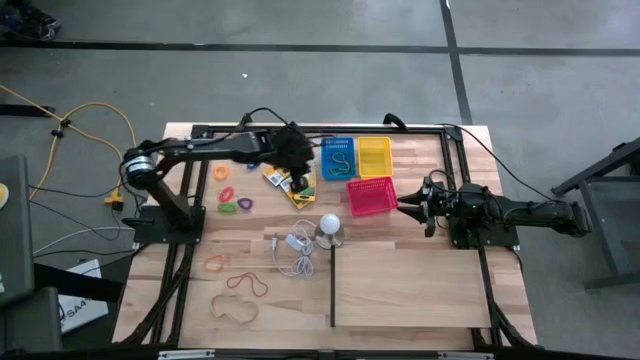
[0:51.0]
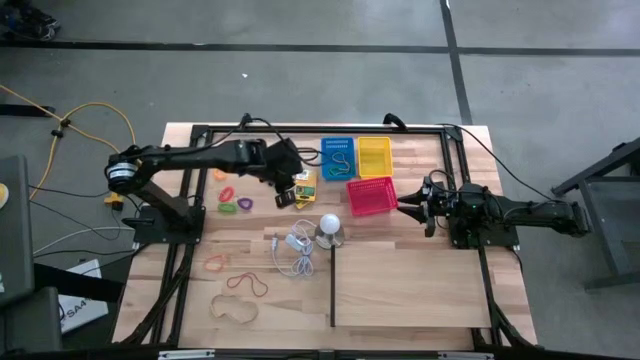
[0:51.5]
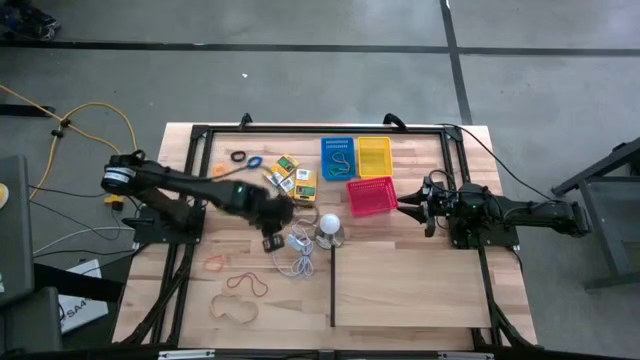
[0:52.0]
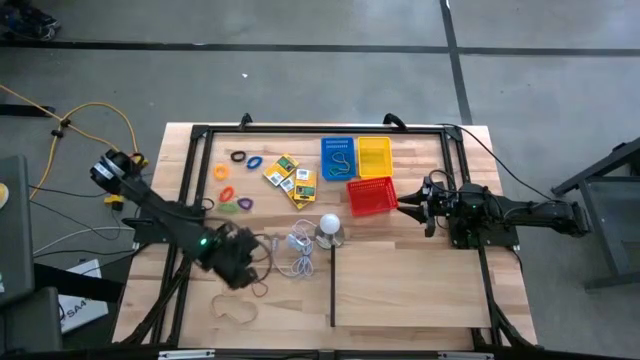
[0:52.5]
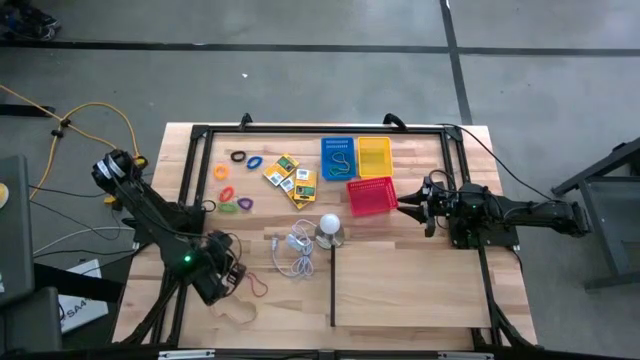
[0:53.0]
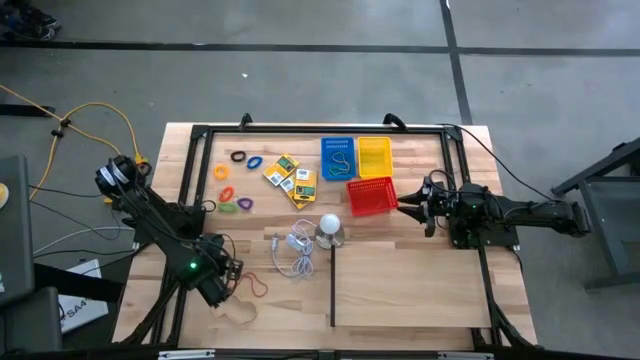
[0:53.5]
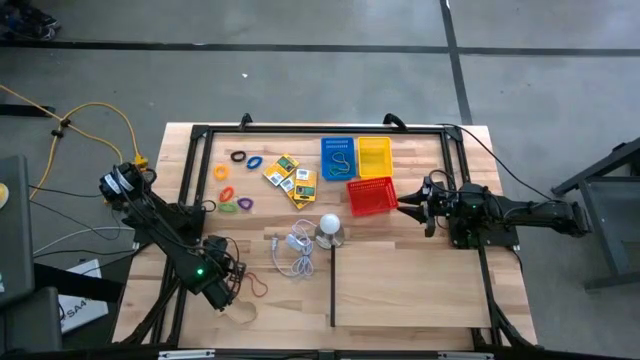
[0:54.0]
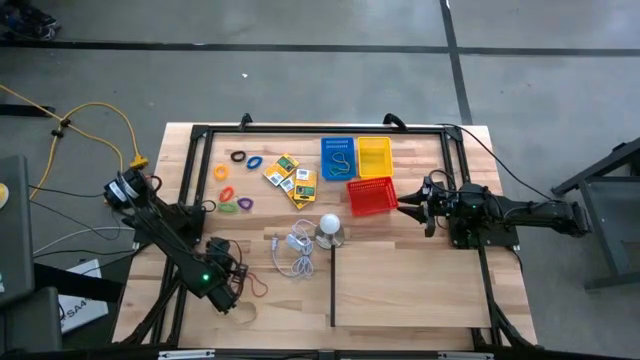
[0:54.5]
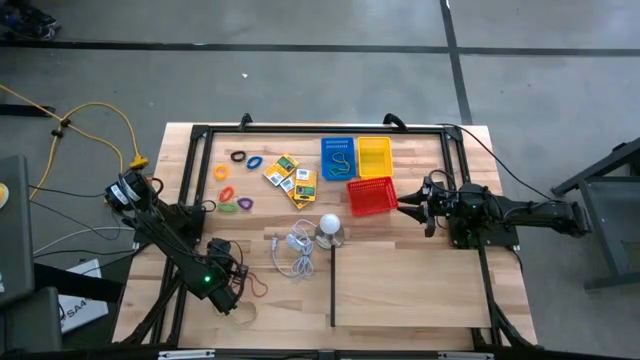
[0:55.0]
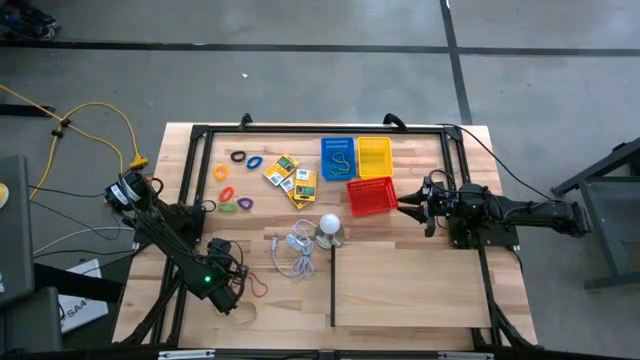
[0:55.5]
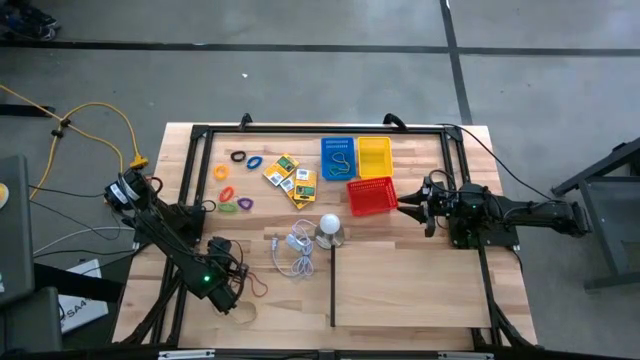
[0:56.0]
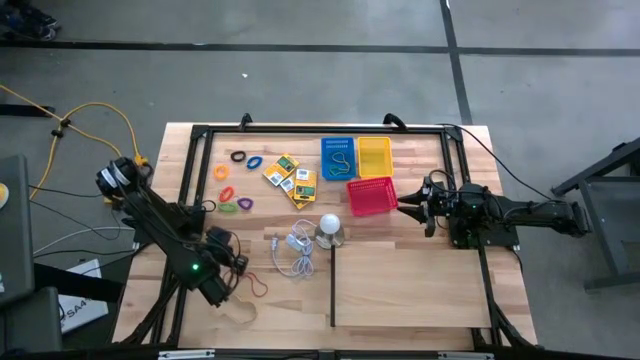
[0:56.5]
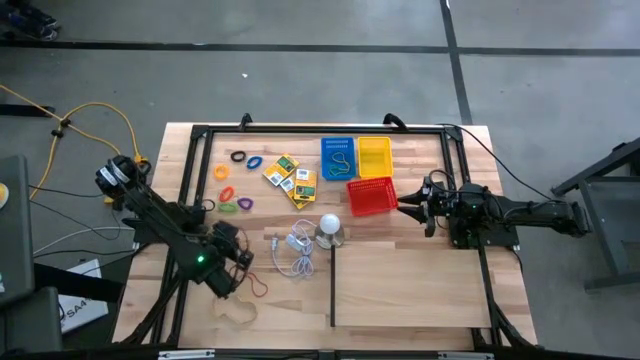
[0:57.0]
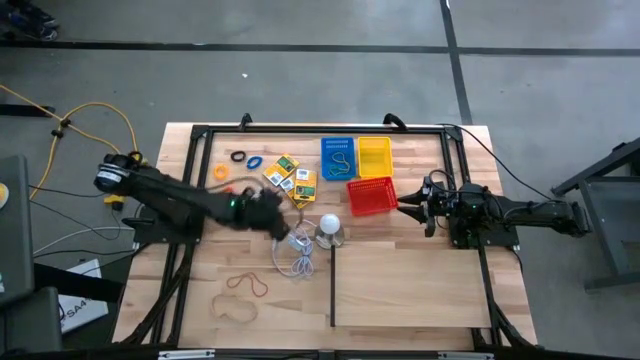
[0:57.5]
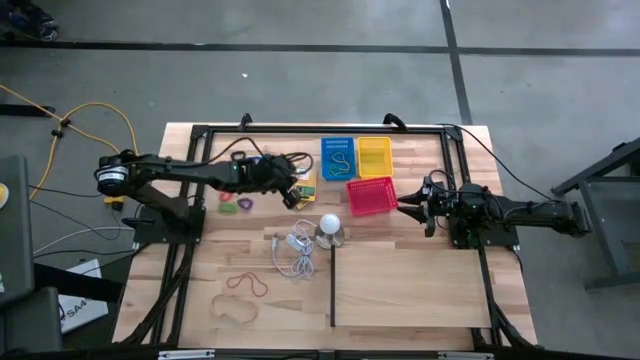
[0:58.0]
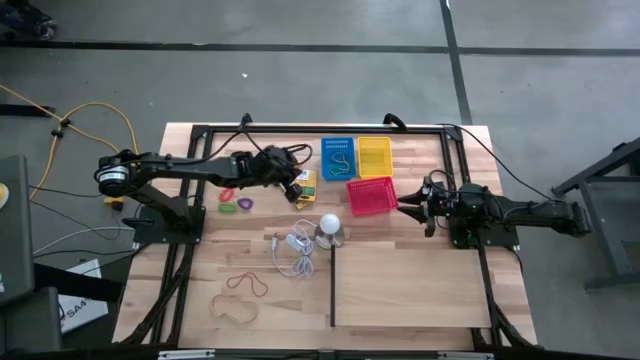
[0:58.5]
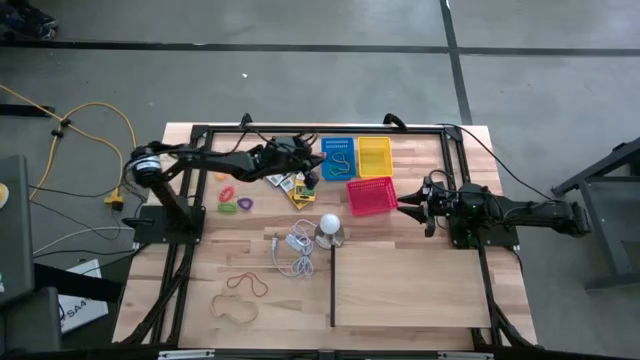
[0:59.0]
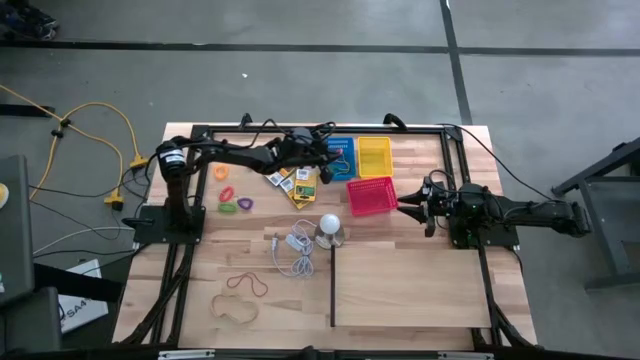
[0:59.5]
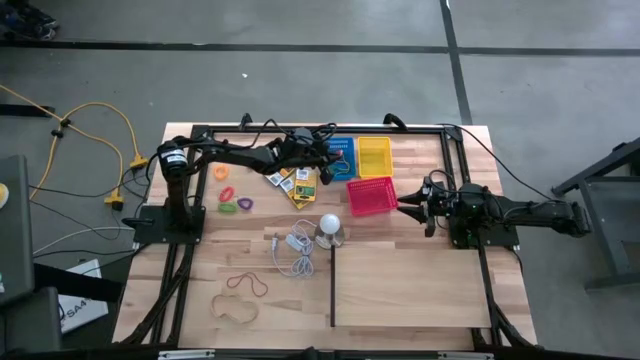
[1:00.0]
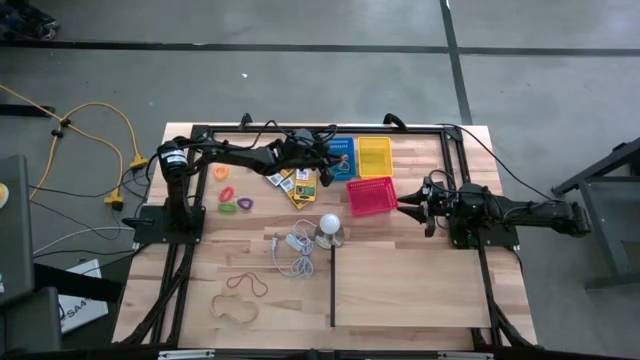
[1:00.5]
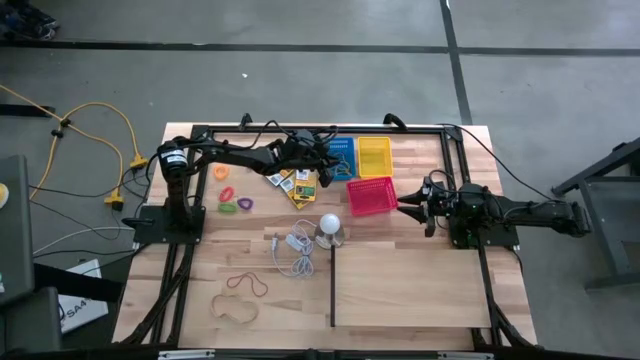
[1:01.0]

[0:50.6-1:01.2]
Task: Pick & Place Office Desk Supplies
Put the orange rubber band into the blue bin

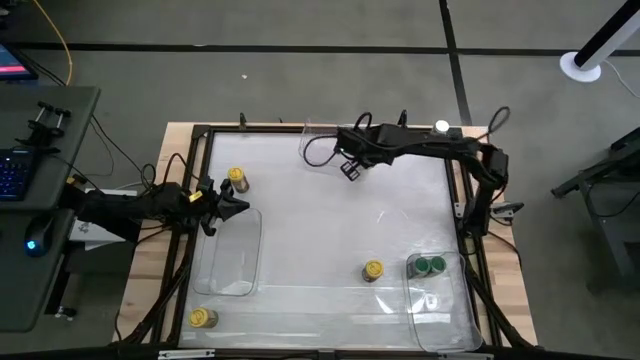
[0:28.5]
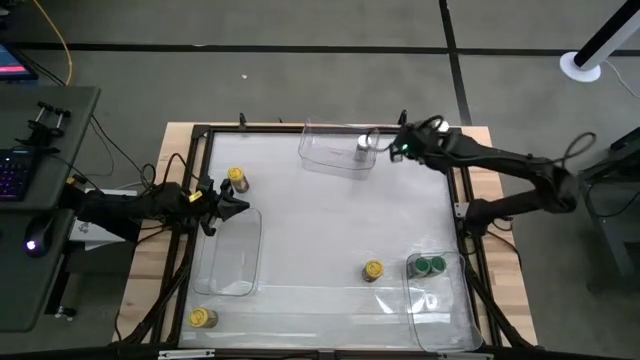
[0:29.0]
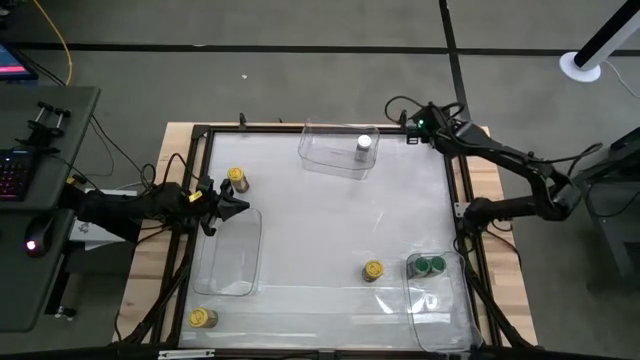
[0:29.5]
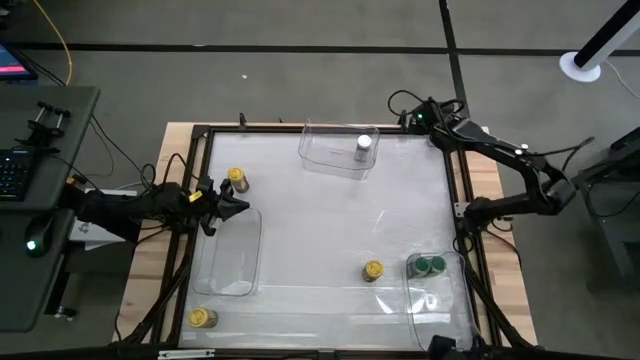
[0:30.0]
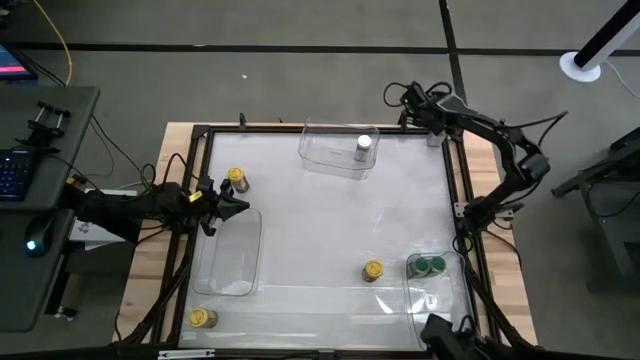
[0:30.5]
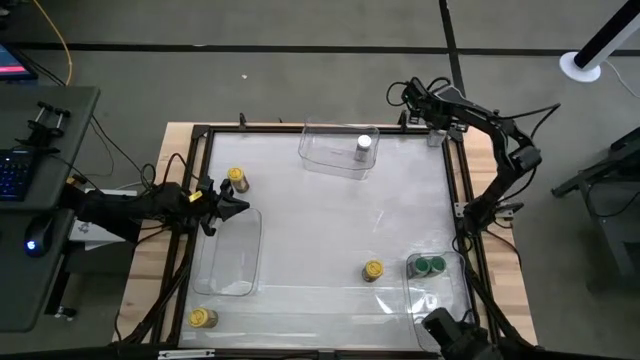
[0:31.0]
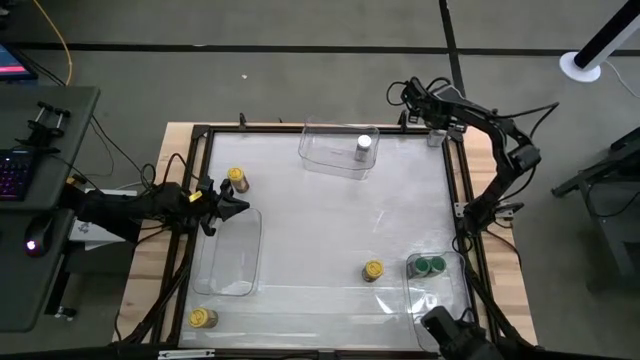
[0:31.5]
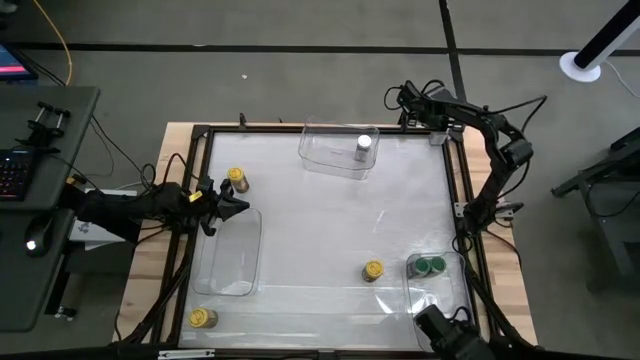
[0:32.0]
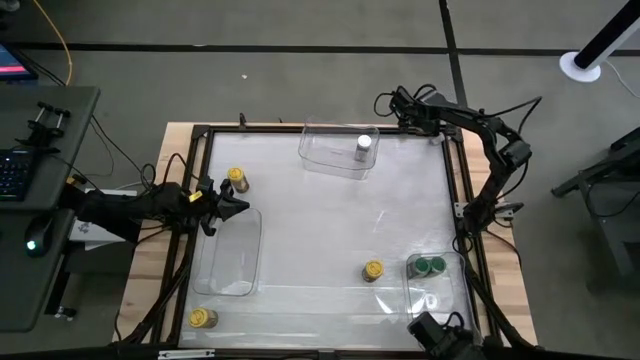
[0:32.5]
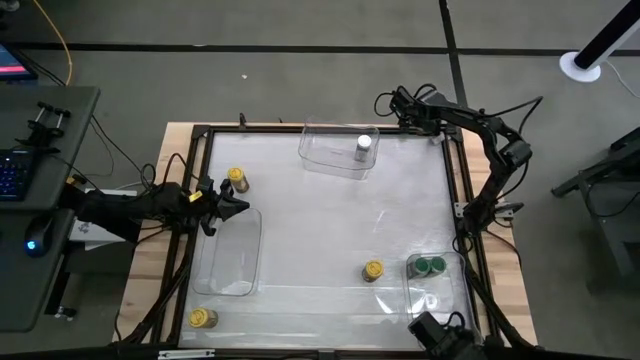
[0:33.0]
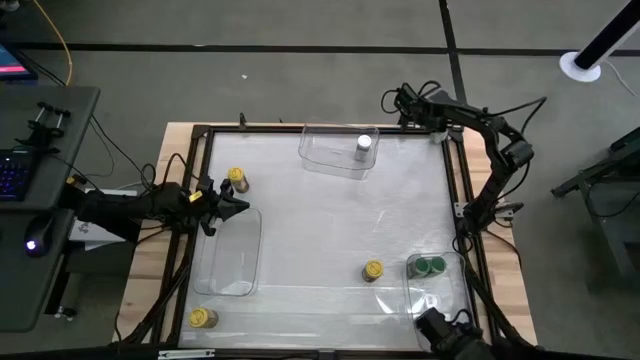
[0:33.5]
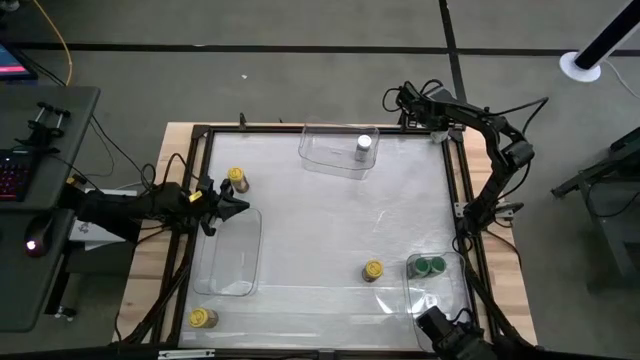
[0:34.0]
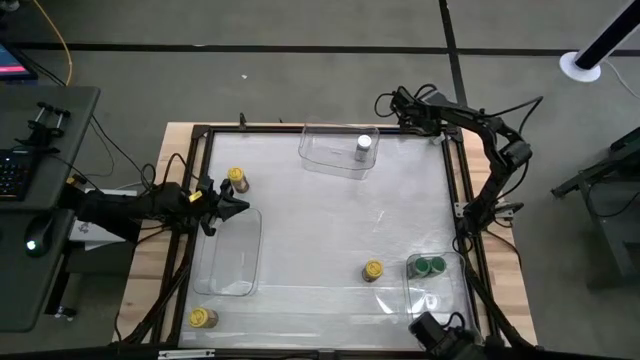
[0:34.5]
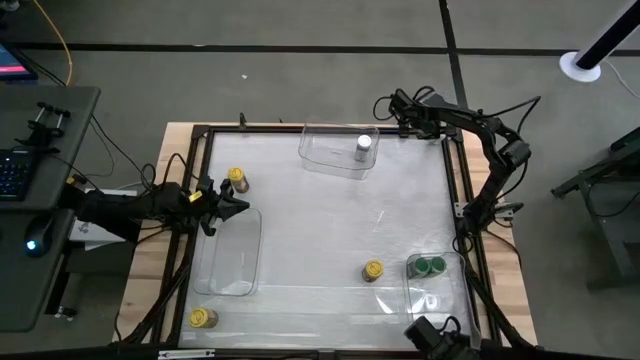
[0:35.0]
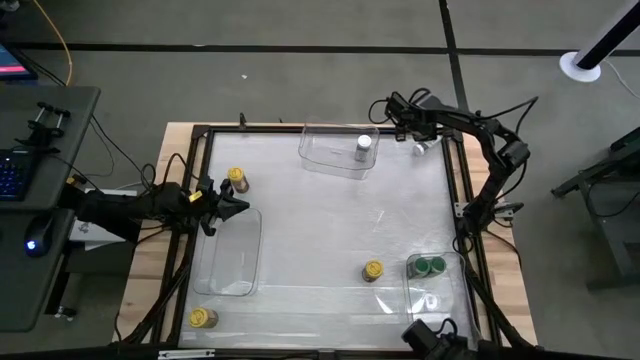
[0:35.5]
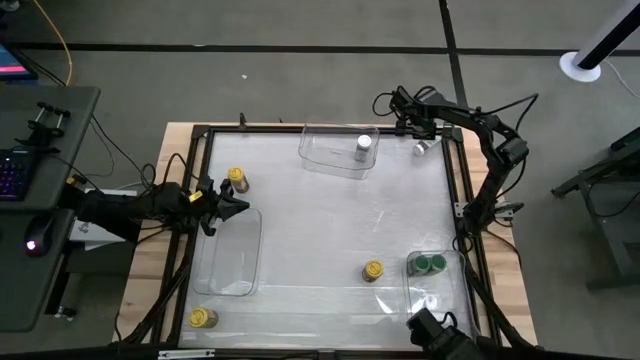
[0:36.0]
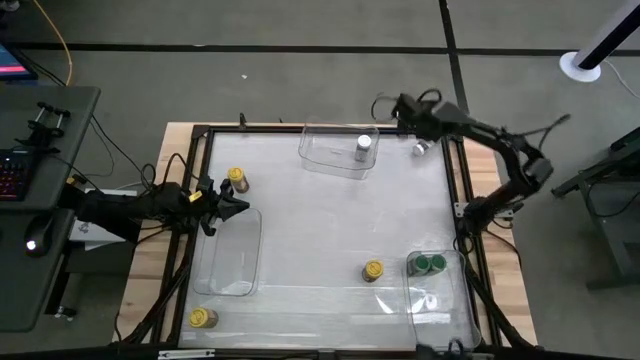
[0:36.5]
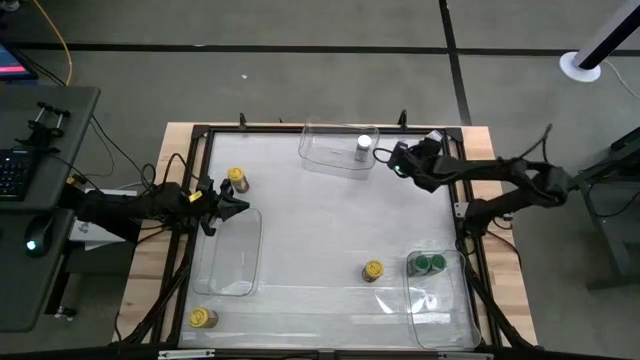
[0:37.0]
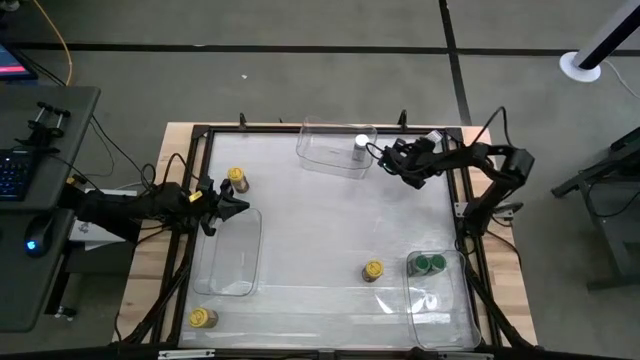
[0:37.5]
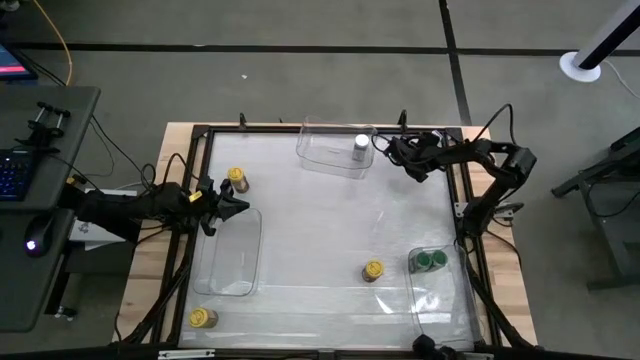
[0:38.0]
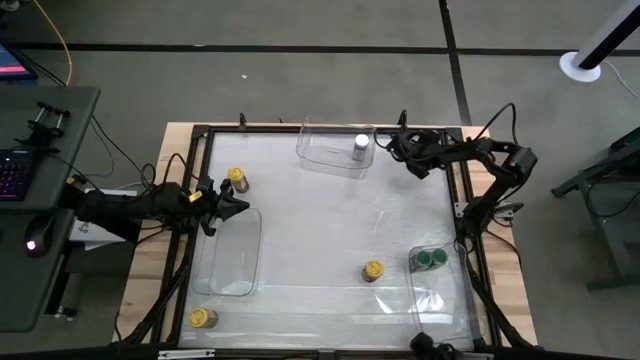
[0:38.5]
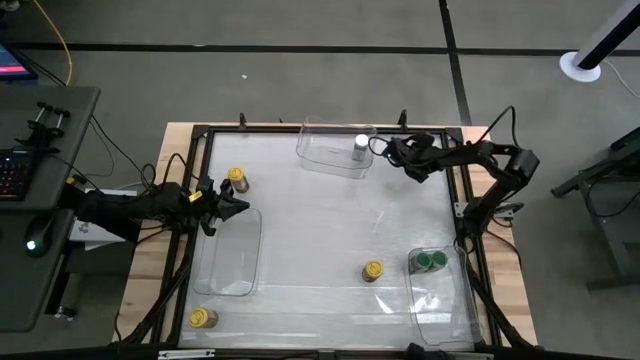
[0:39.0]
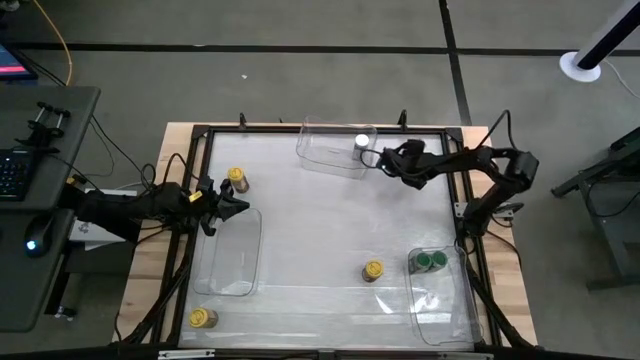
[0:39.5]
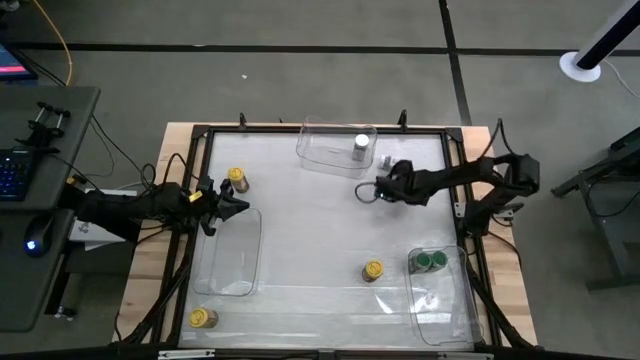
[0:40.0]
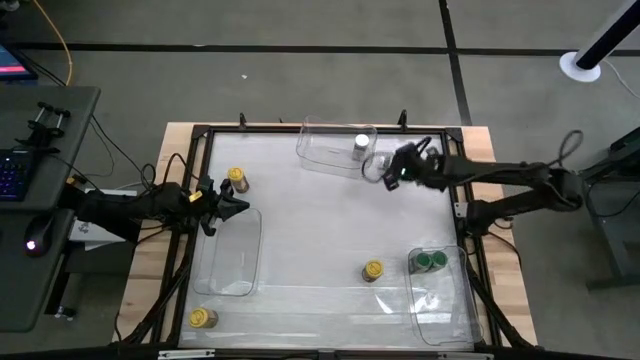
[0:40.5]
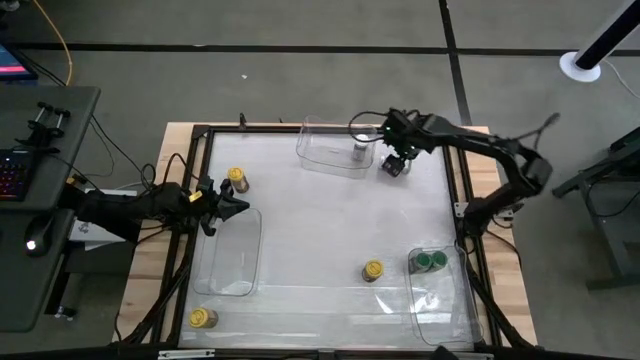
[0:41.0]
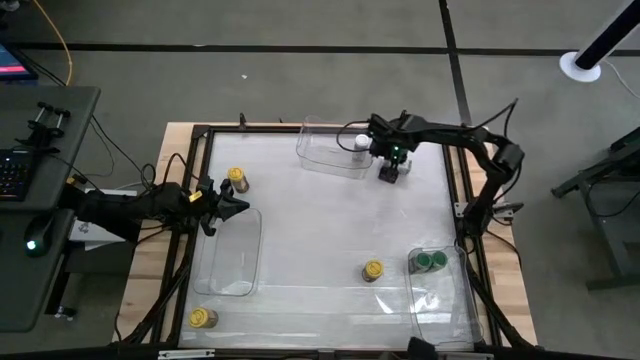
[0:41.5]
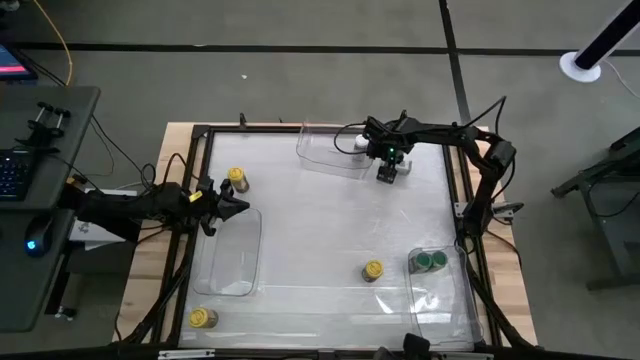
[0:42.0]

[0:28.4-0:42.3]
Task: Sort spices by type
Put the white seasoning bottle into the top transparent bin
